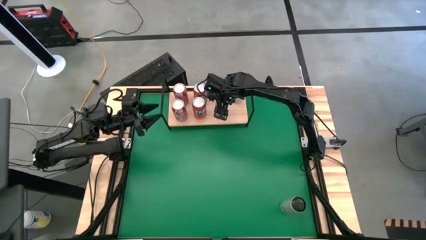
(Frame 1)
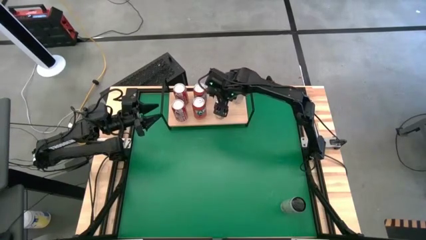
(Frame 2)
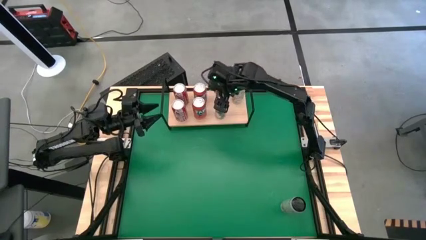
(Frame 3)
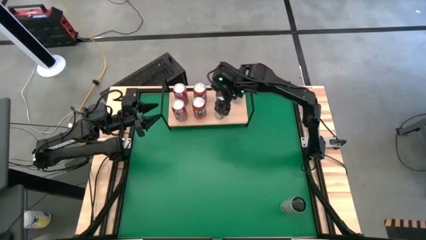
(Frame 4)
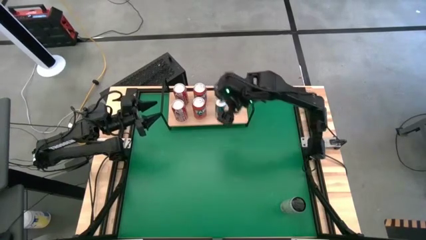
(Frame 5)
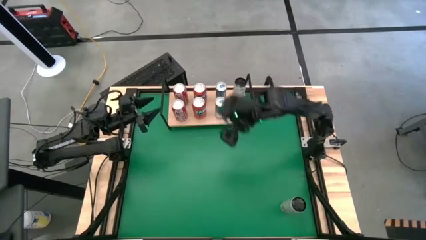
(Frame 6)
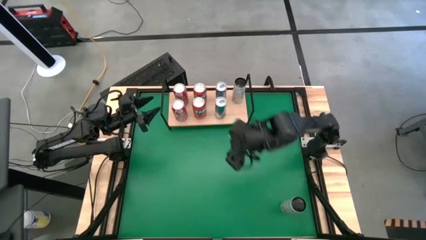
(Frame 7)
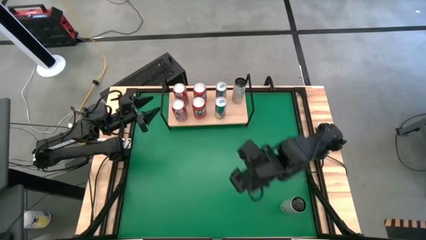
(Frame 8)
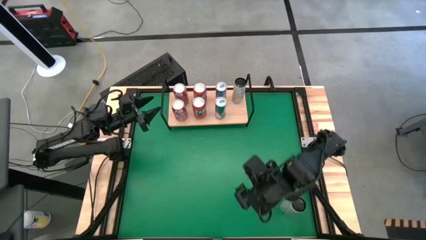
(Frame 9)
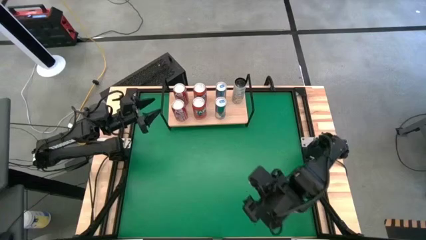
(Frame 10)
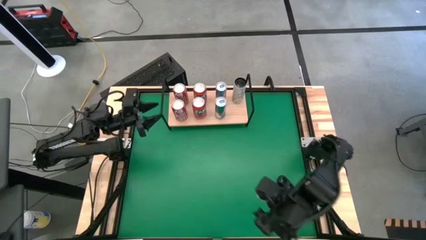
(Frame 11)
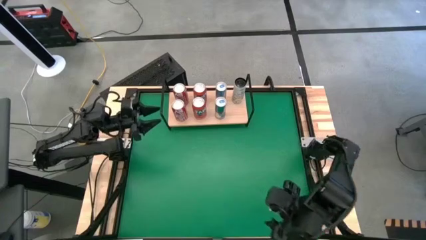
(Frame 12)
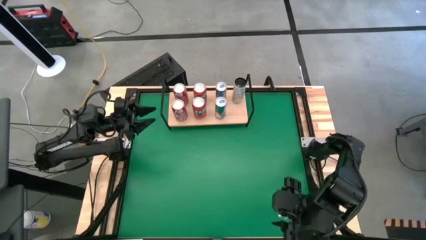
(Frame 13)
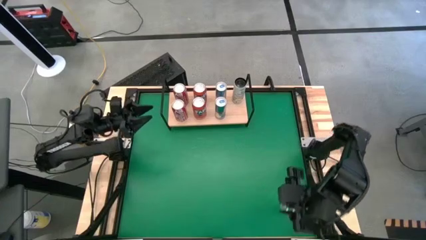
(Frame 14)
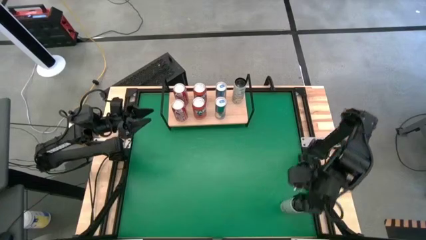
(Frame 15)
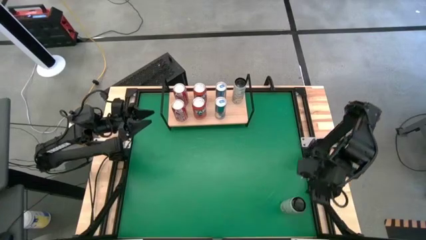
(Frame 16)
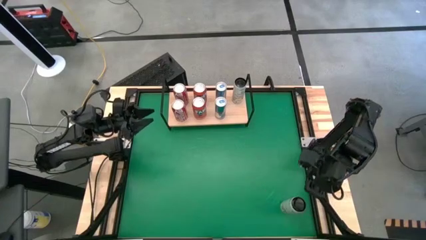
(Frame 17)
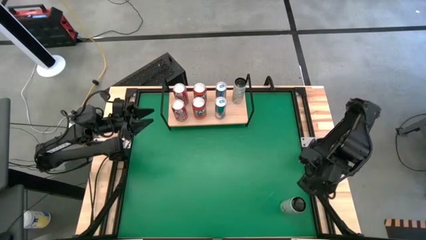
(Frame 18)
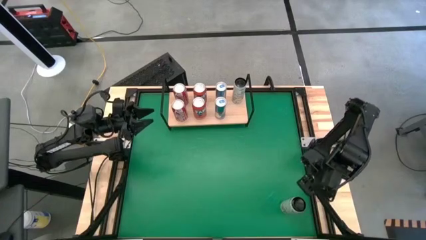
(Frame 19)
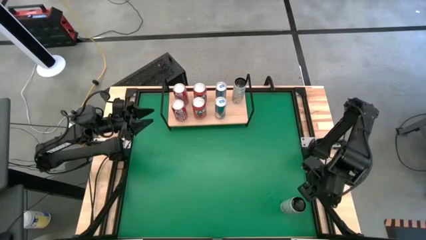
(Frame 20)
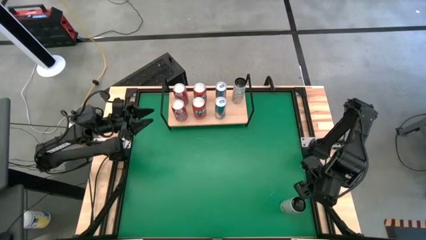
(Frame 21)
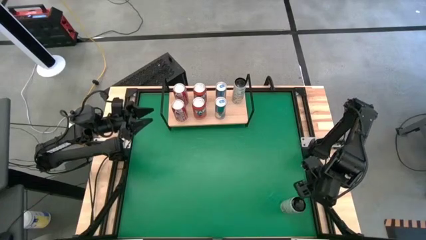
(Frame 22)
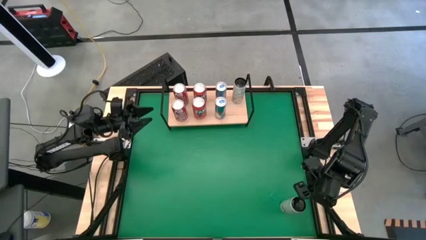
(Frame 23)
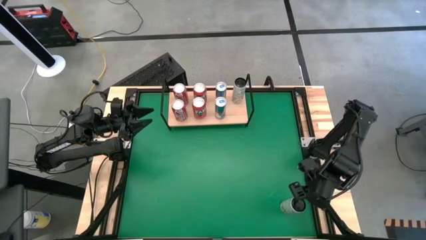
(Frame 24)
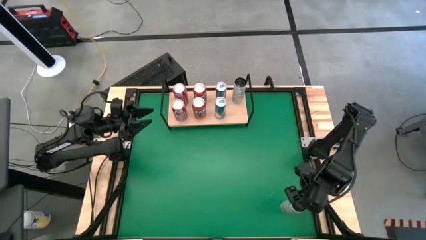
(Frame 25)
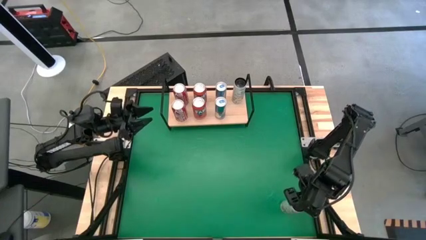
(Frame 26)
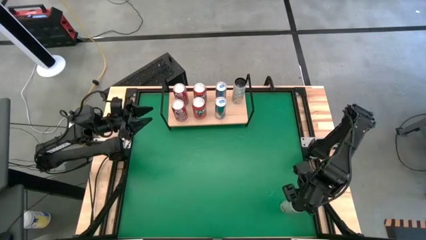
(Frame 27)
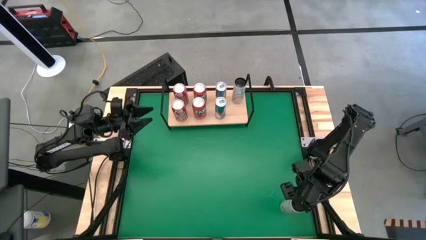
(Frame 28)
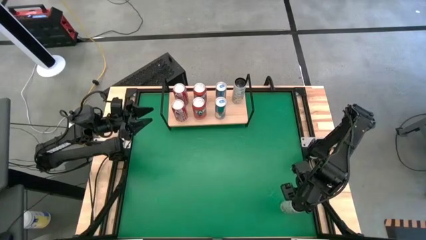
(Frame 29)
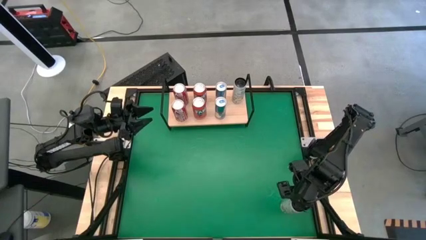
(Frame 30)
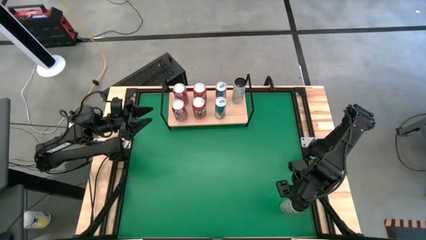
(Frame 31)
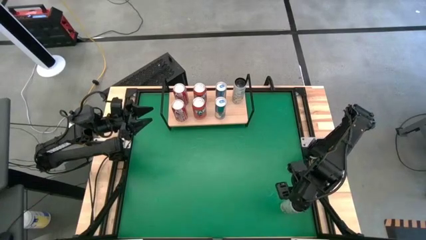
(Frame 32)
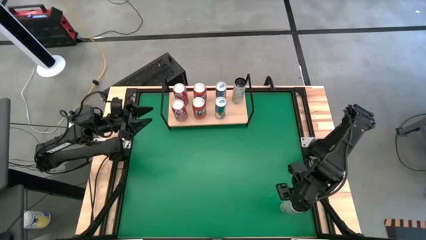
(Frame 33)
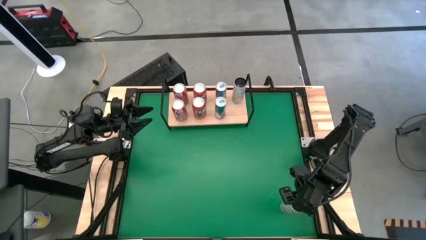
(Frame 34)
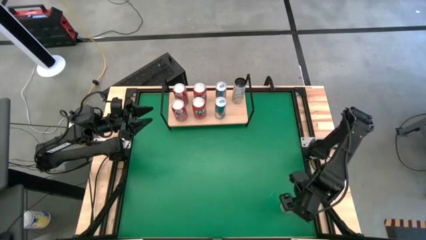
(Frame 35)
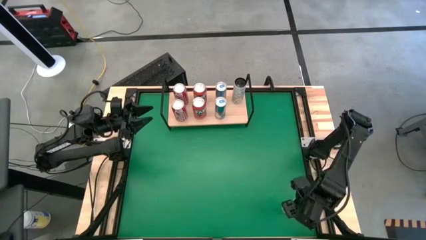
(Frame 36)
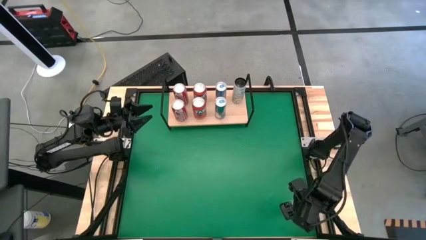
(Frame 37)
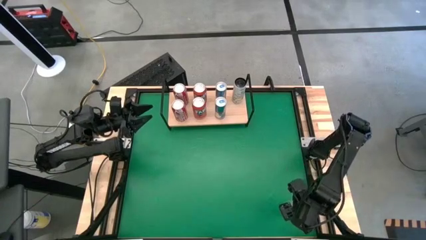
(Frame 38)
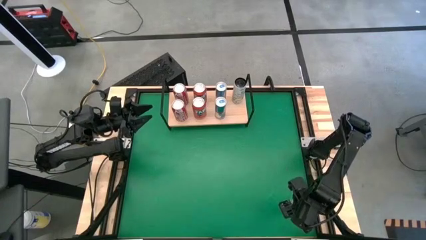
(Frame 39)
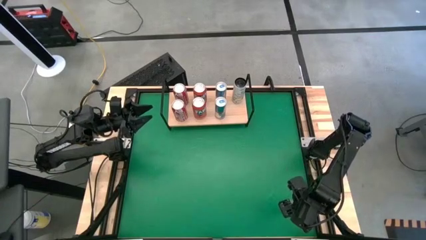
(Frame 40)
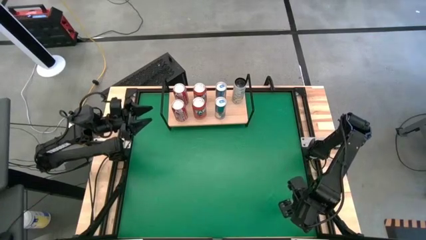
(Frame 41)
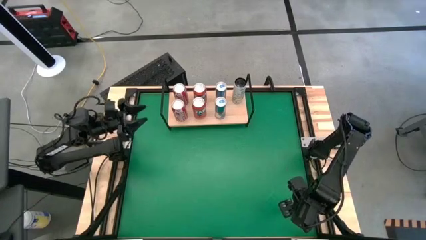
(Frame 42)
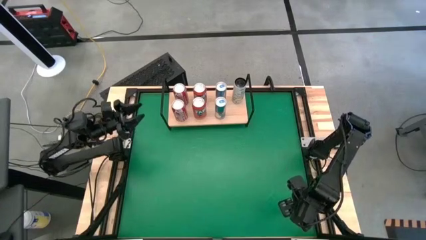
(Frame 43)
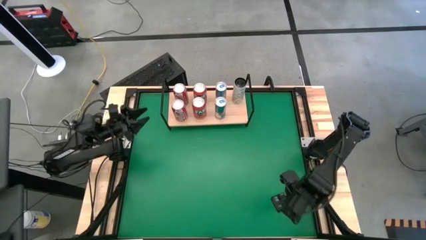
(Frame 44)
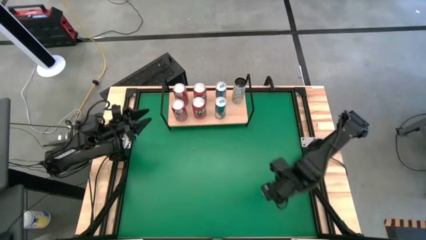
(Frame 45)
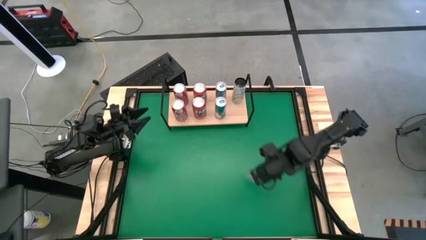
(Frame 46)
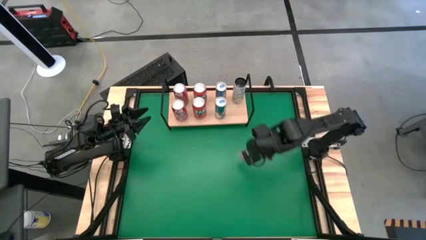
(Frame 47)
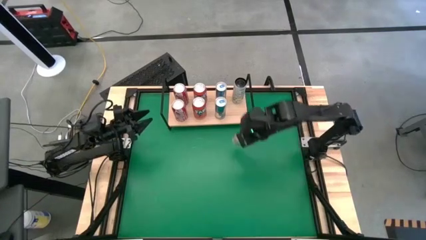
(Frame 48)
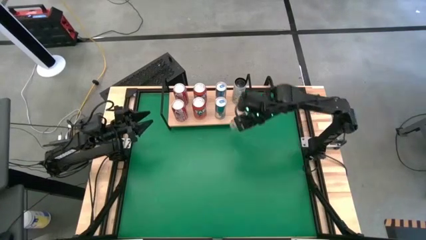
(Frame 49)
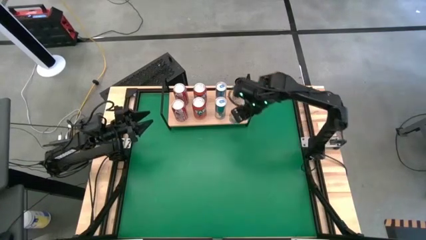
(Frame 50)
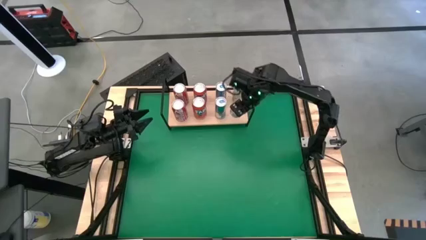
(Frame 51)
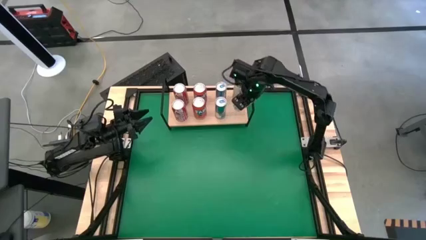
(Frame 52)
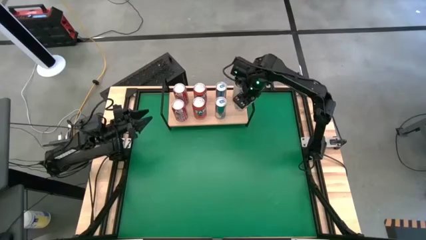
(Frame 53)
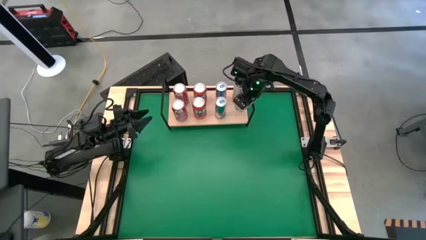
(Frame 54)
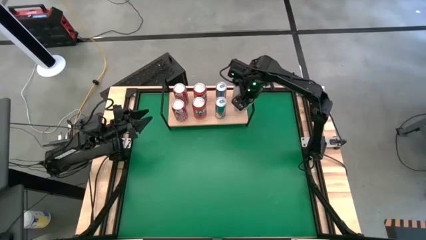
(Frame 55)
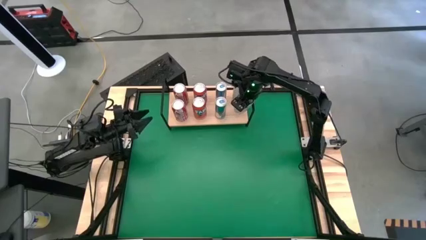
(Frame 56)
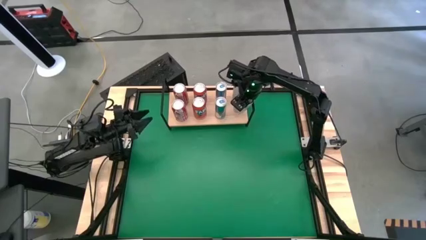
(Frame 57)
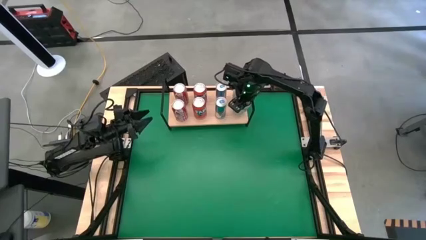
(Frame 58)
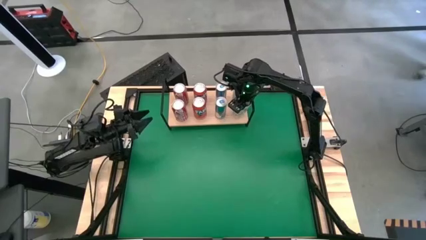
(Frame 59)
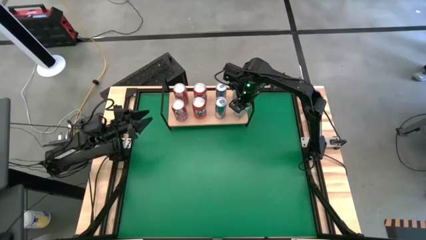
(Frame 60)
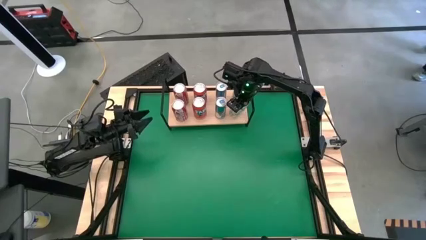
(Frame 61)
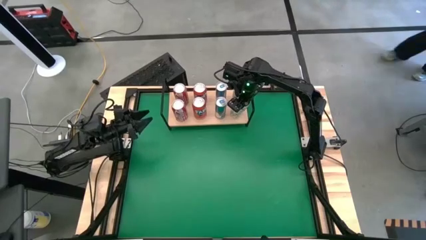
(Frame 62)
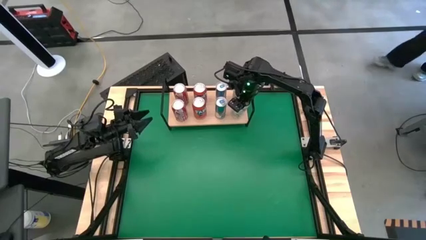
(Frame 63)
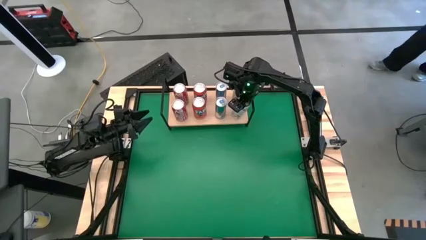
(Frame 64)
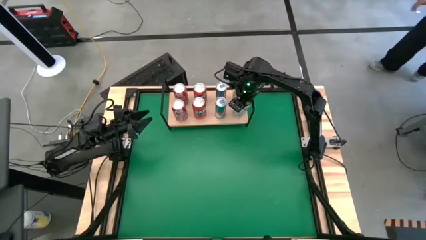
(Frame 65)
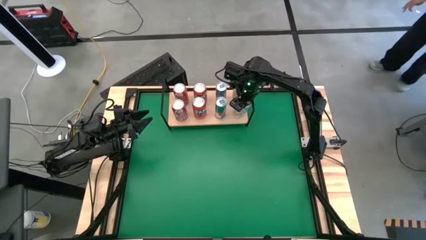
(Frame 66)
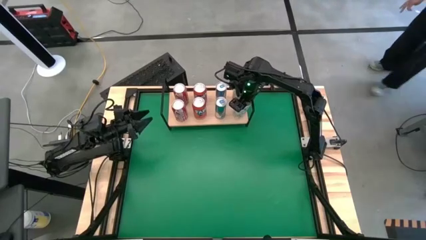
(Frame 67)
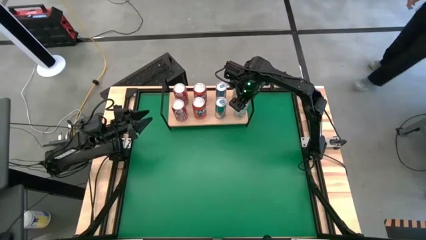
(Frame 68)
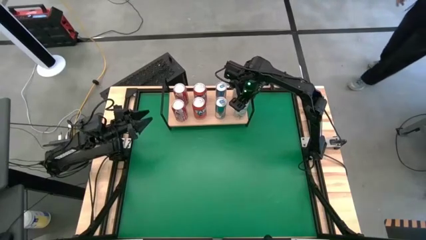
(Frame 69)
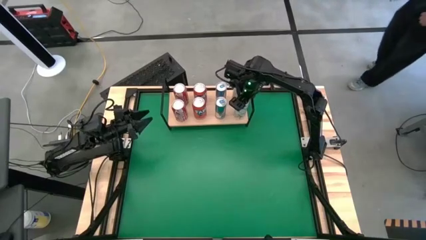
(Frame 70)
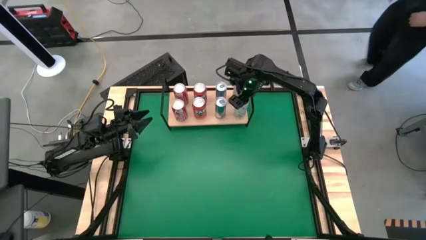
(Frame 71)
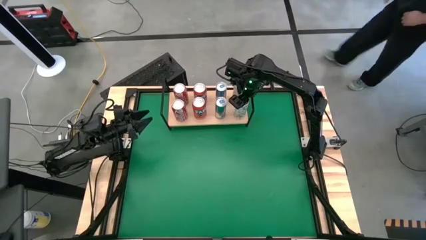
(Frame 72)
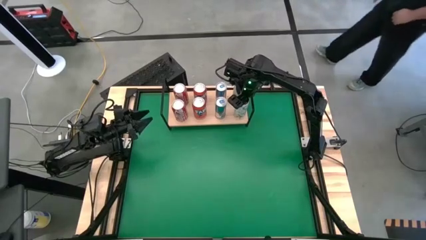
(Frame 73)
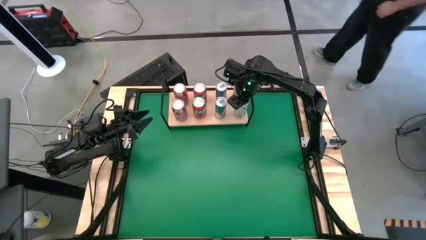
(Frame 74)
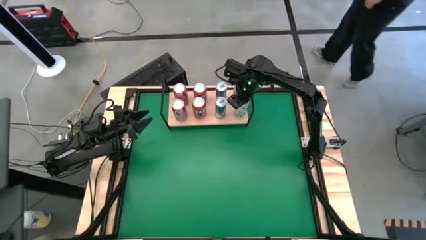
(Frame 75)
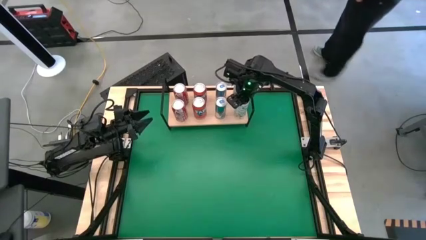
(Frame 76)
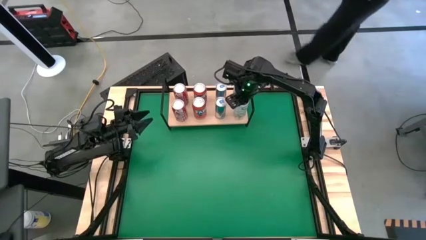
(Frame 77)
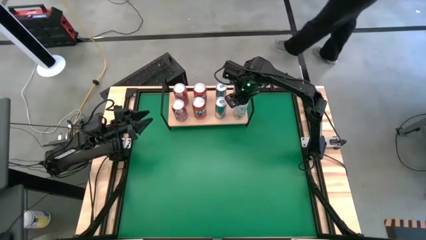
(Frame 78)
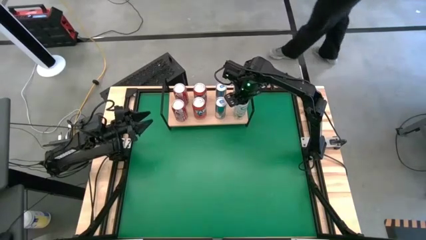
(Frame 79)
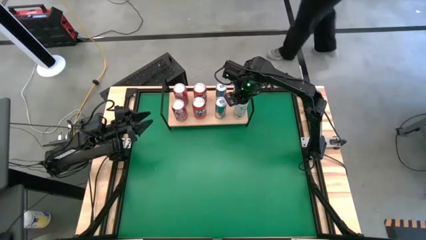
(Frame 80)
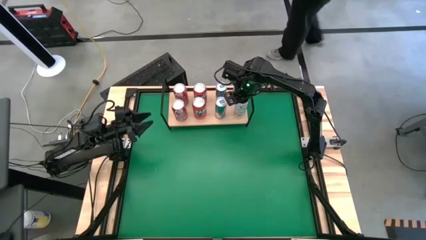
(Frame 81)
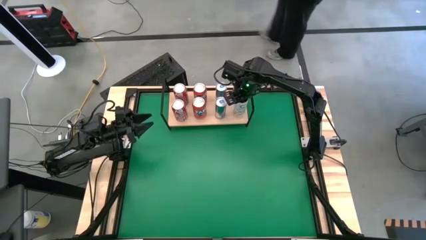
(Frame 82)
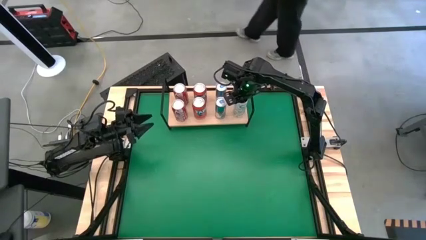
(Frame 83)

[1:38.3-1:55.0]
Task: Place canned beverage on shelf
Put the white-yellow soda can on the shelf aligned with the other white-yellow soda can
